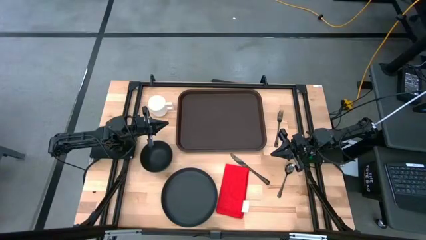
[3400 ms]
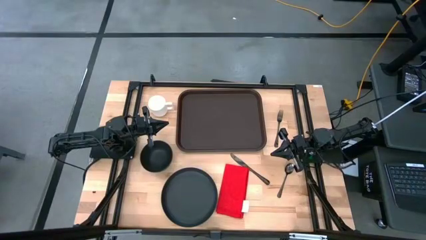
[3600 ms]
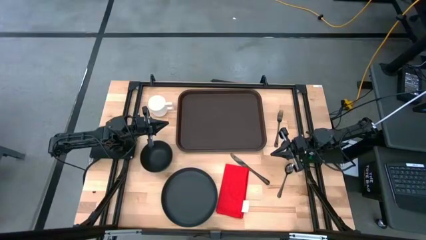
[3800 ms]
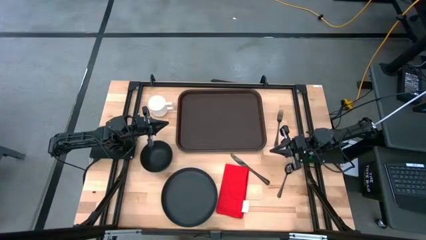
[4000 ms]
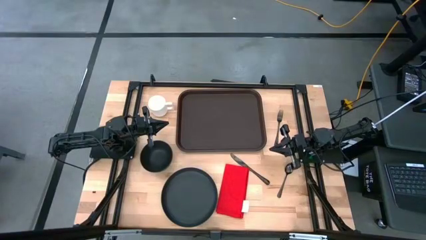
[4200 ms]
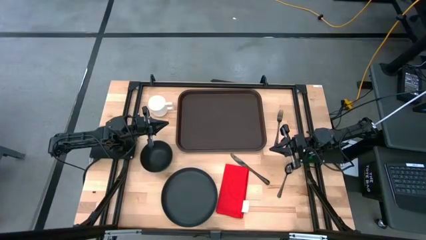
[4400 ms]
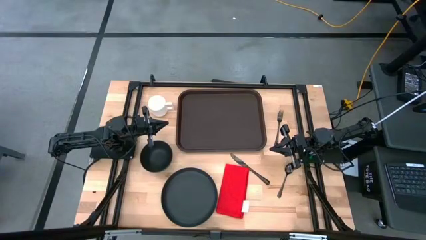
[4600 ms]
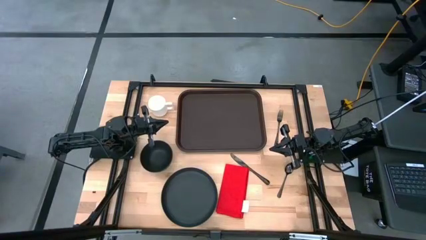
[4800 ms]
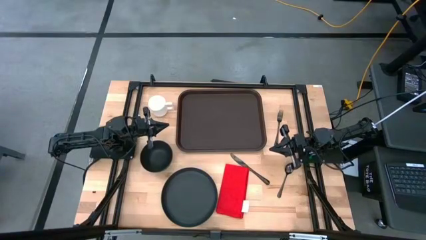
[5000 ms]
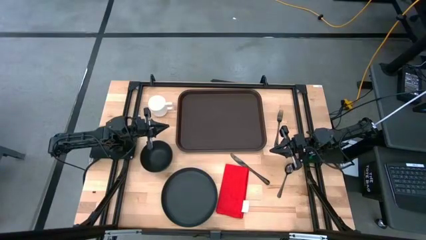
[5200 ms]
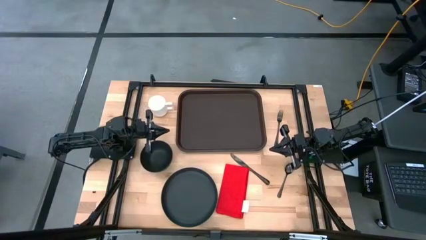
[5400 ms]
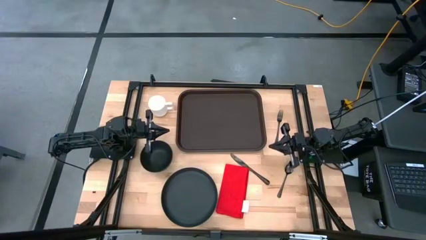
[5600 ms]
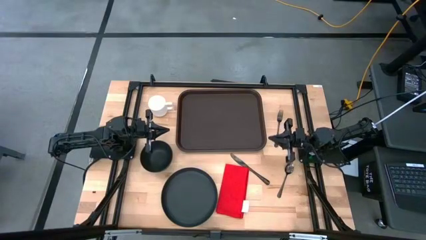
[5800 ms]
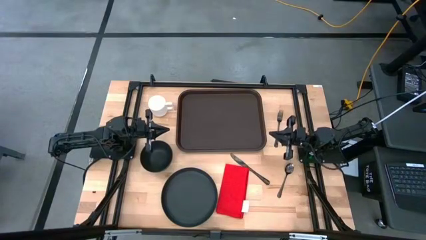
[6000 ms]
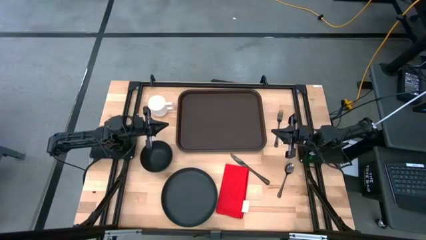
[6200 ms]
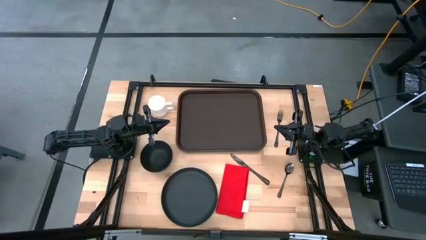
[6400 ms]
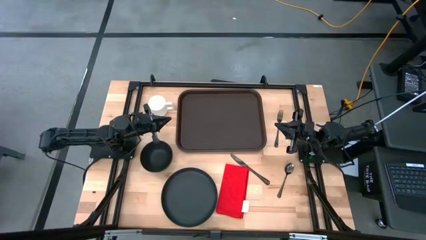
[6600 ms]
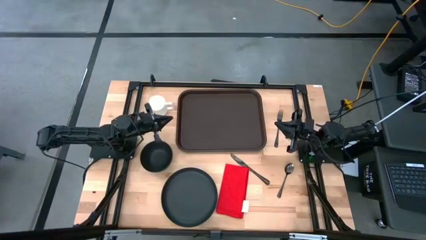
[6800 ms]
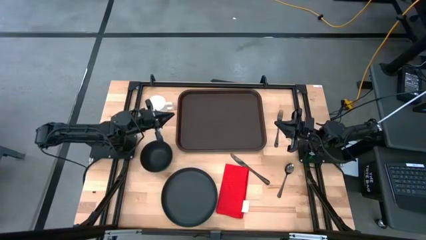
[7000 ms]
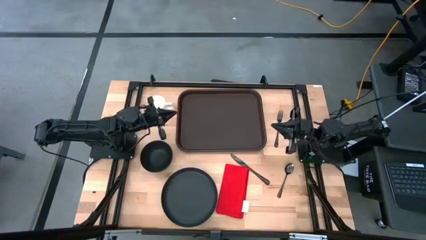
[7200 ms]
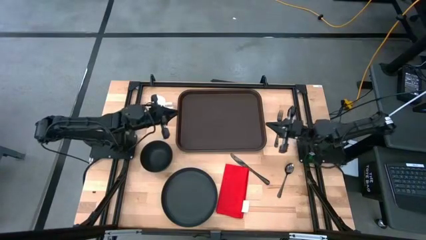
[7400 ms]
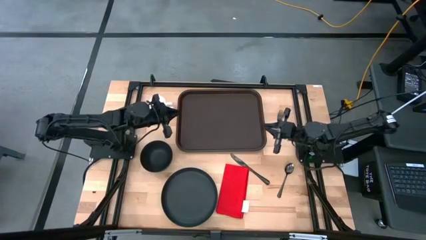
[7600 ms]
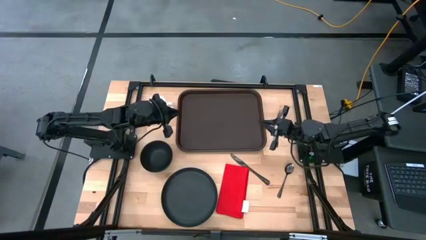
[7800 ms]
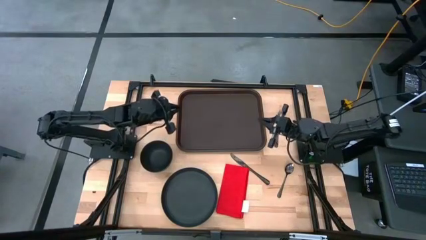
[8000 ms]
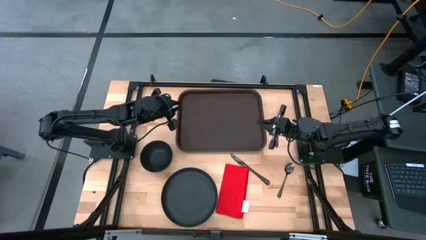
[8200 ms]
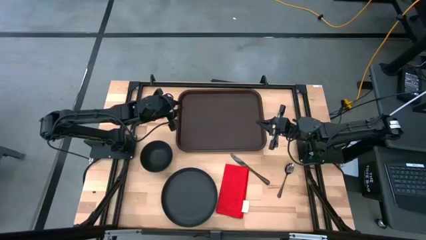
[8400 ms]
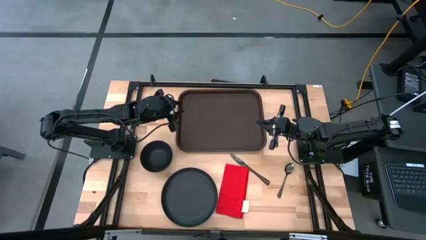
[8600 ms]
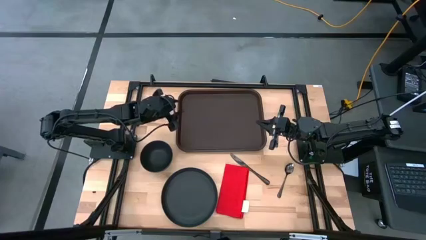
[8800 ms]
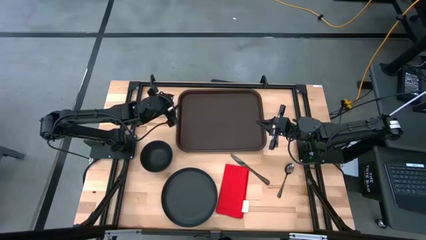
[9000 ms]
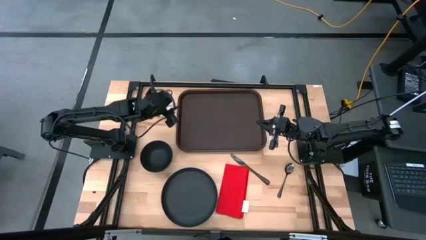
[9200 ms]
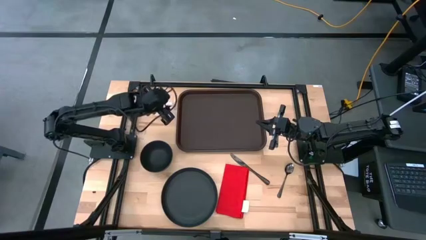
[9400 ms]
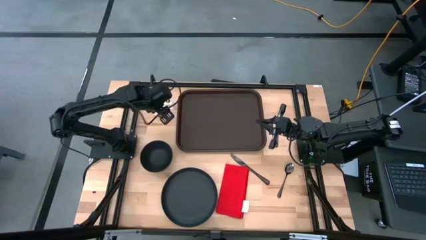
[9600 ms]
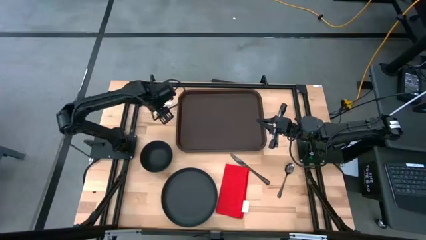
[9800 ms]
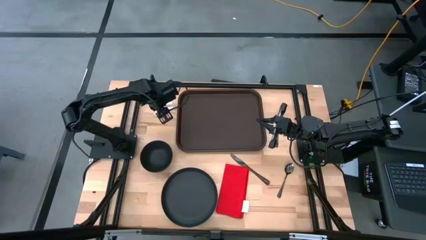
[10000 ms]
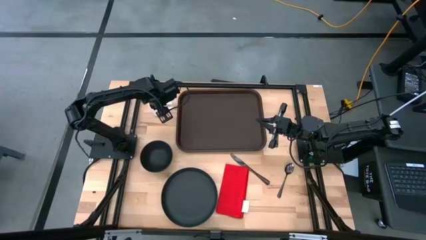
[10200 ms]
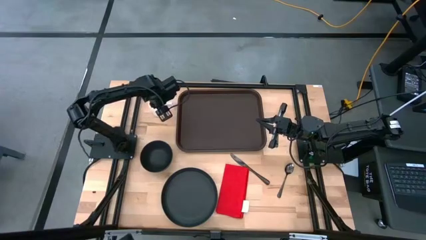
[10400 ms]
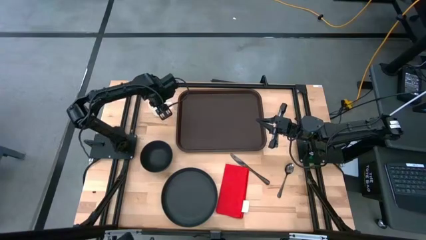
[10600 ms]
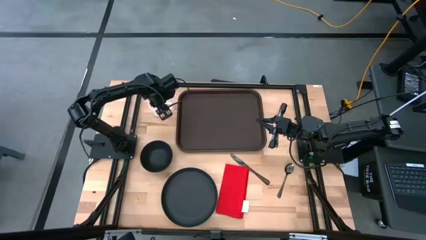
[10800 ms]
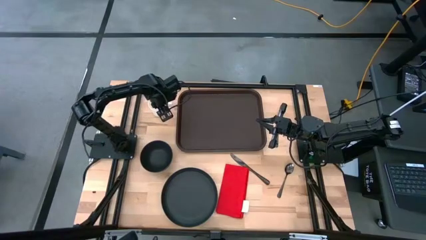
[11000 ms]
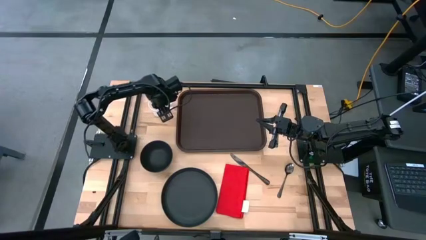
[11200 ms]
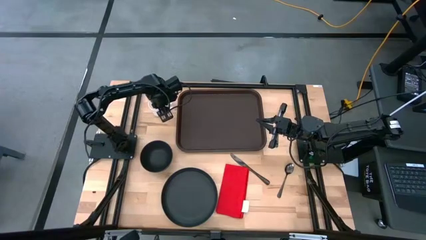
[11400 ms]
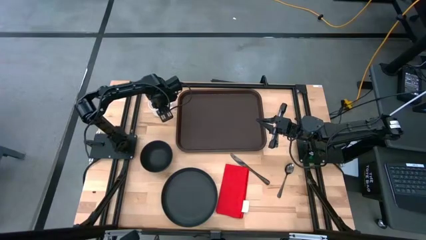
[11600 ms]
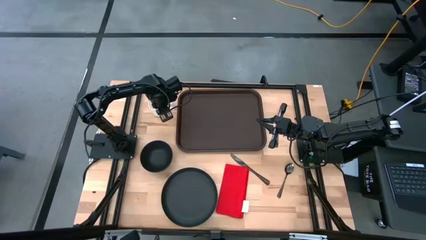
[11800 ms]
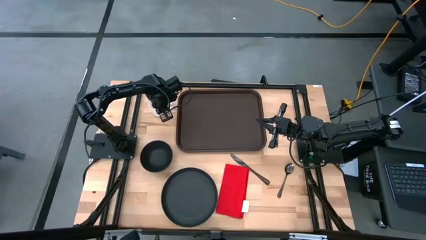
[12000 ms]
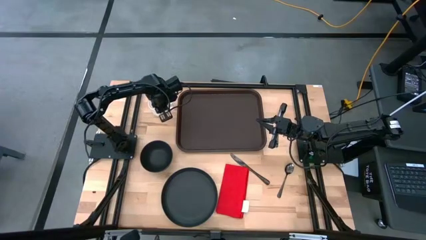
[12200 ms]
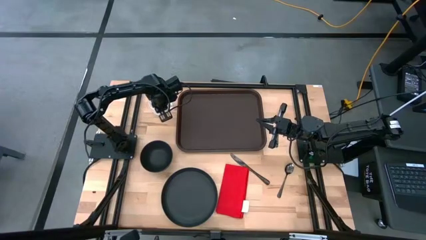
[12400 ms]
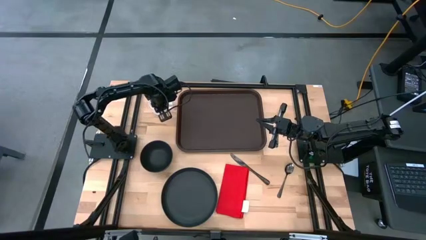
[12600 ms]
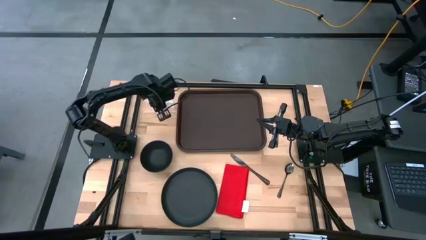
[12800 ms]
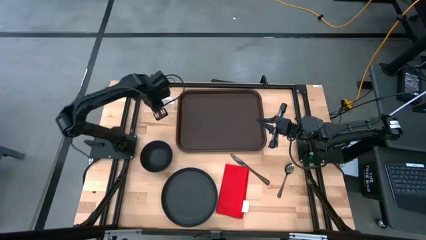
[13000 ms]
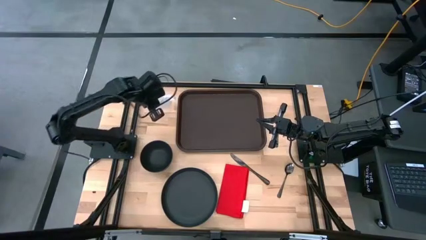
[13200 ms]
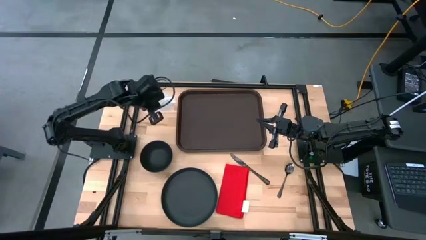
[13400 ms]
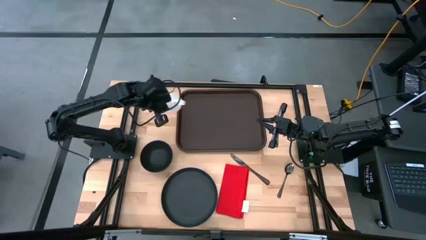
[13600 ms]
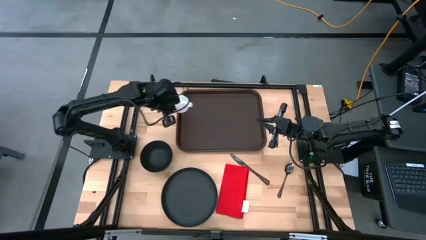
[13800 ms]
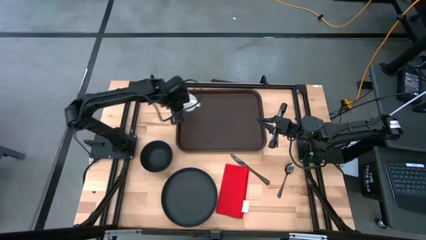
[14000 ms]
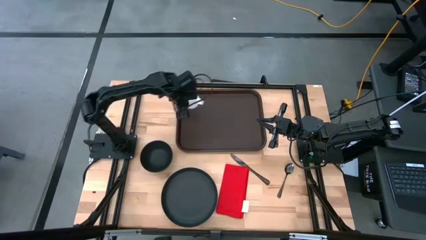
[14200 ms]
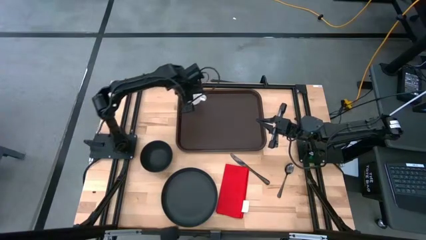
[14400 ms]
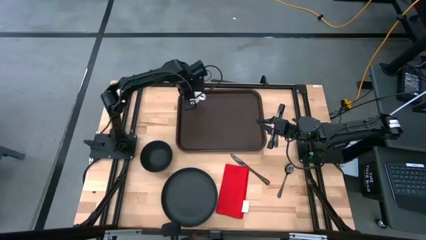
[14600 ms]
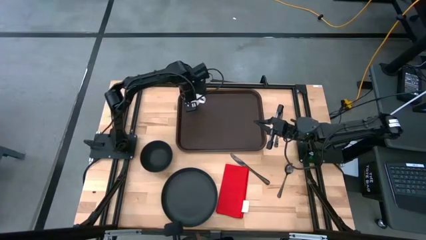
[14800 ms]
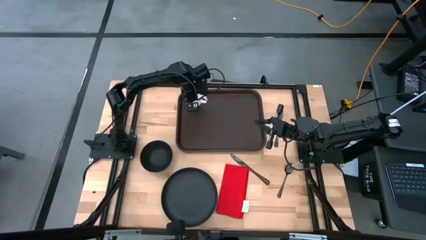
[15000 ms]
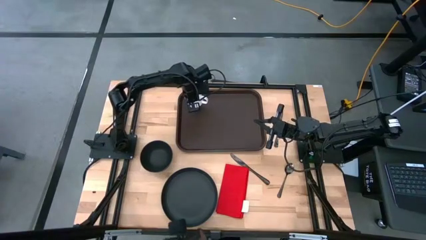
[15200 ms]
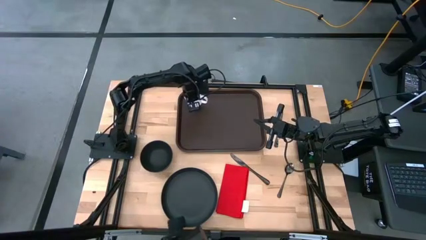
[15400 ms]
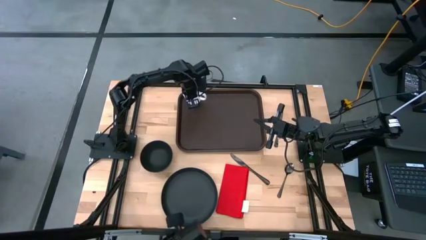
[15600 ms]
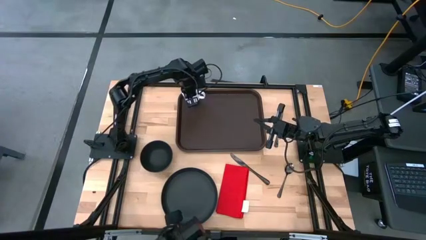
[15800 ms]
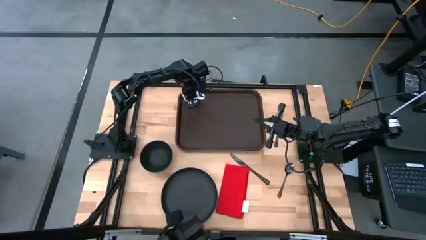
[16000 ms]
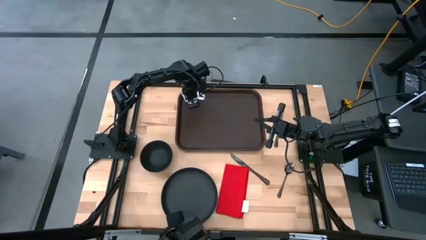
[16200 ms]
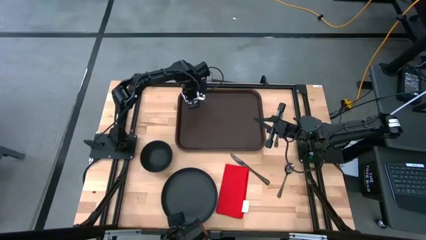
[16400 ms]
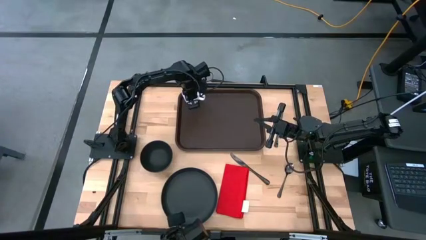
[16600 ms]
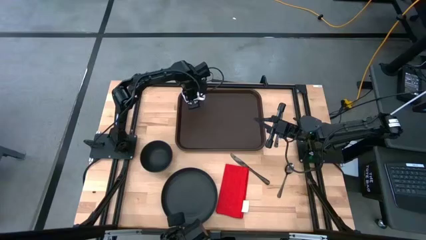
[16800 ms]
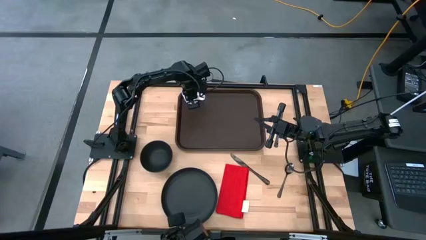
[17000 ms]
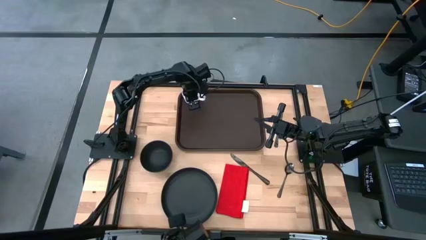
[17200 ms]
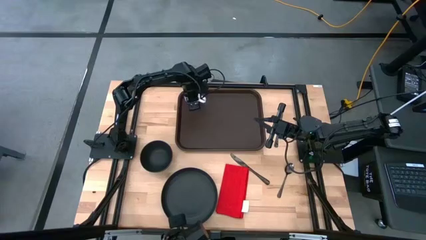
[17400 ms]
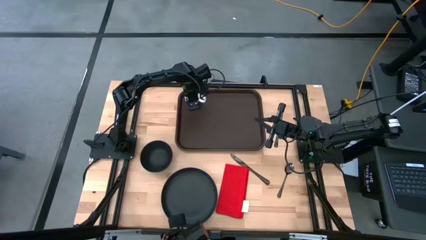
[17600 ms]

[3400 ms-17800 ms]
Task: Set up tray
Put the white cup on the top left of the brown serving tray
